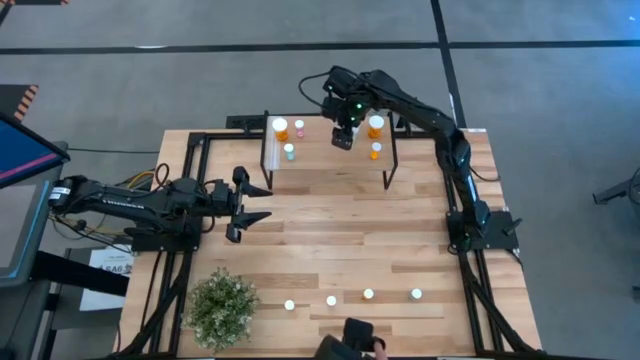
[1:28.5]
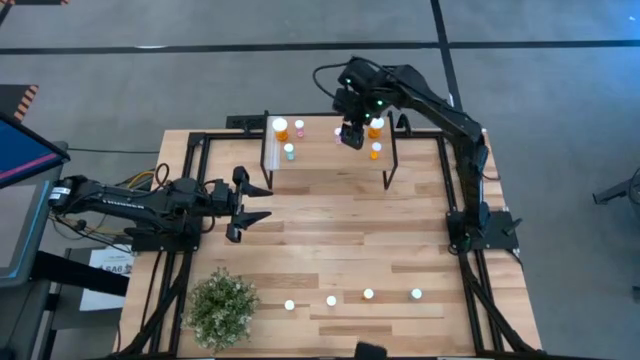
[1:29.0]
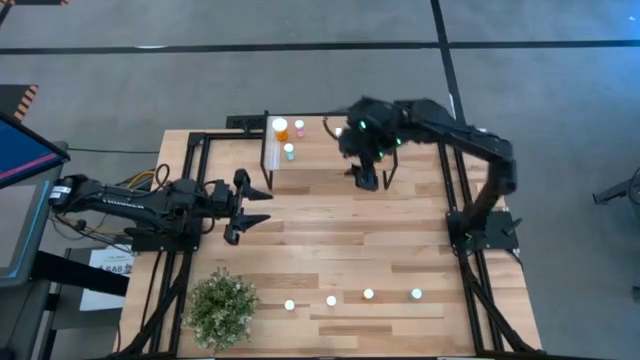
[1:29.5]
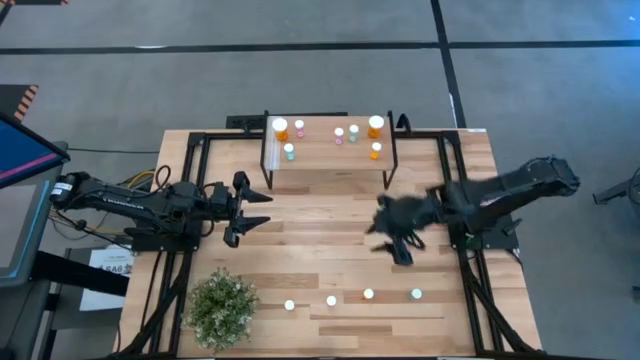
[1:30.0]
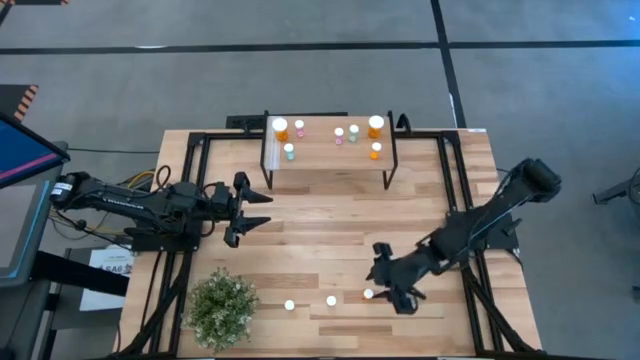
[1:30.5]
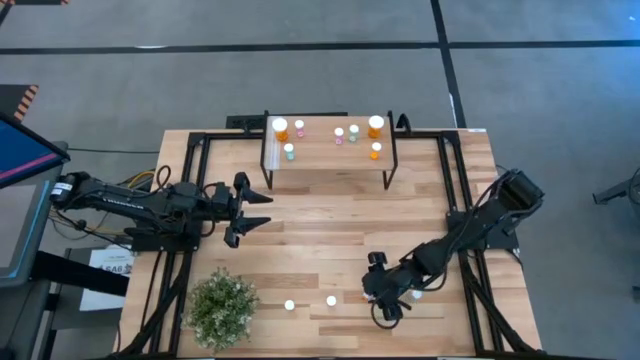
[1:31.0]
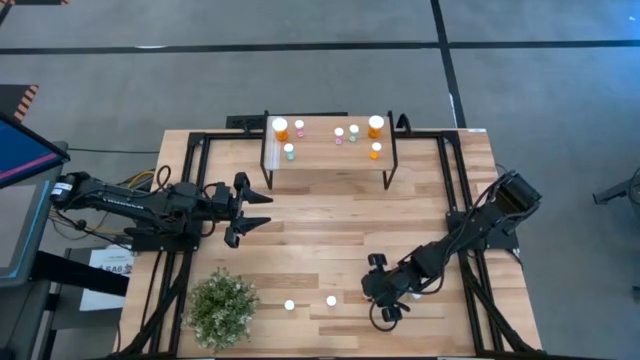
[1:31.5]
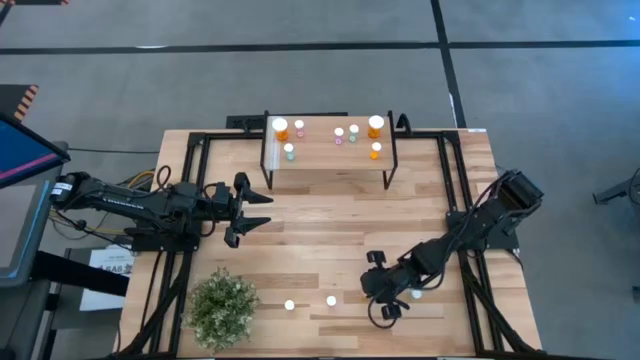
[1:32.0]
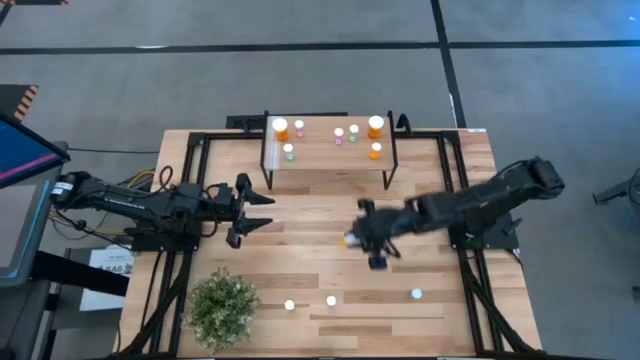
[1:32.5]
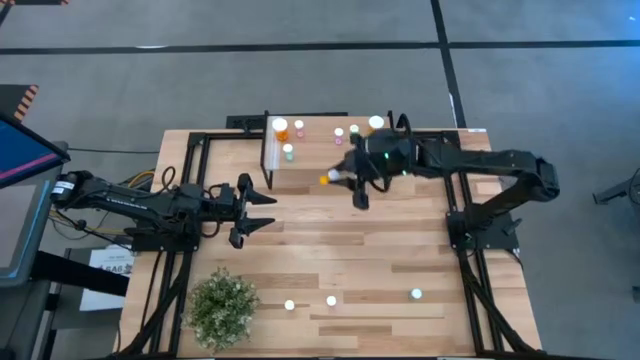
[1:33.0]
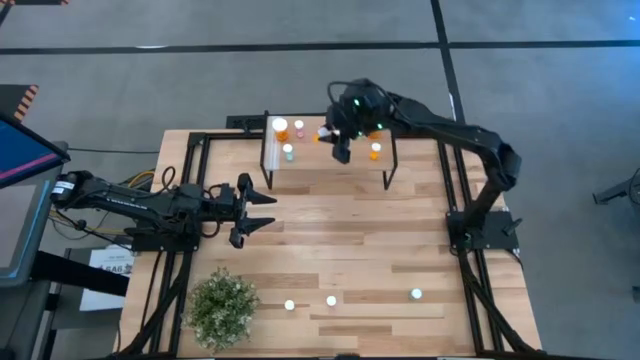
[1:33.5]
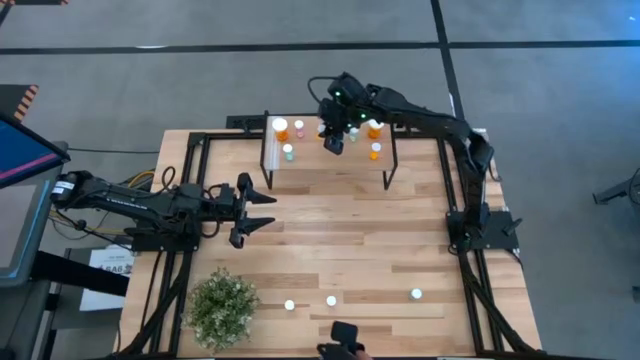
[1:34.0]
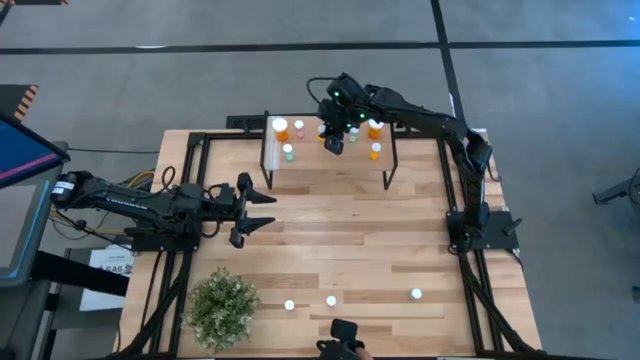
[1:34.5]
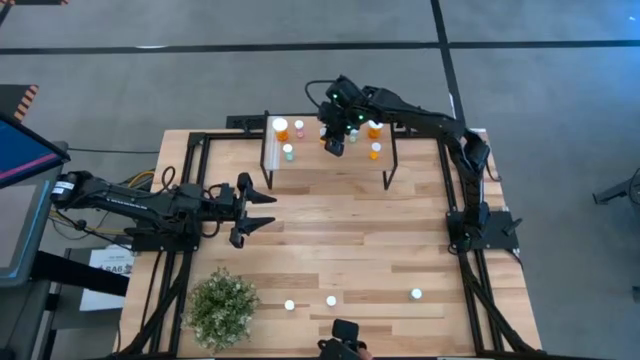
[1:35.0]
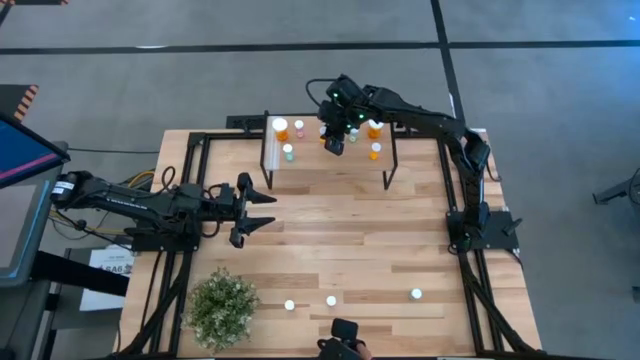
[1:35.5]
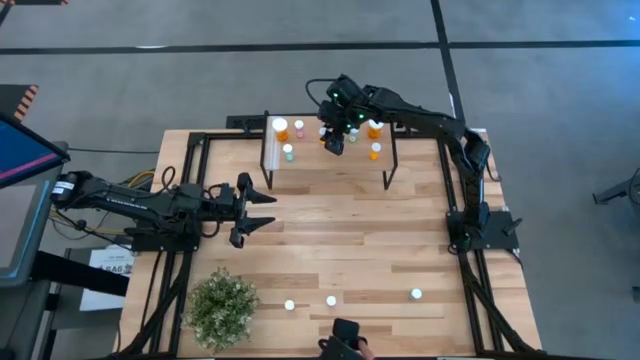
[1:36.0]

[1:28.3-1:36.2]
Task: Pick and place medicine bottles onto shelf by color
Put the orange pill bottle on the shelf

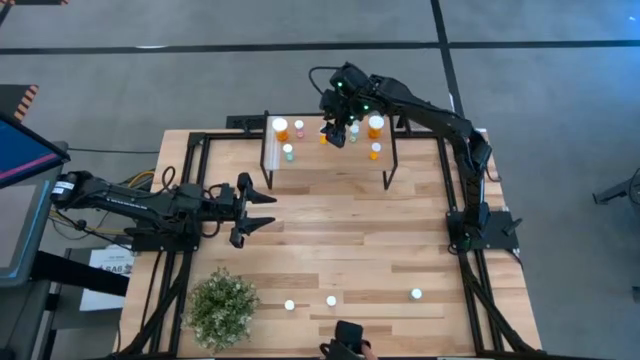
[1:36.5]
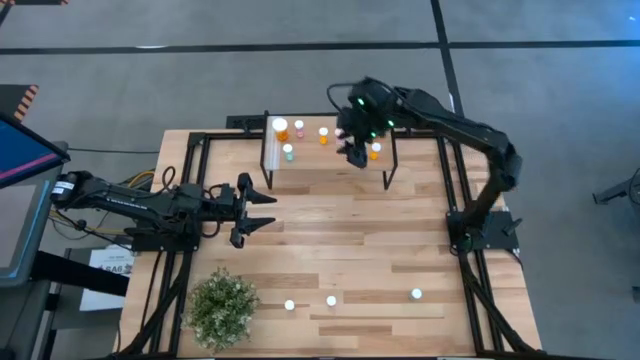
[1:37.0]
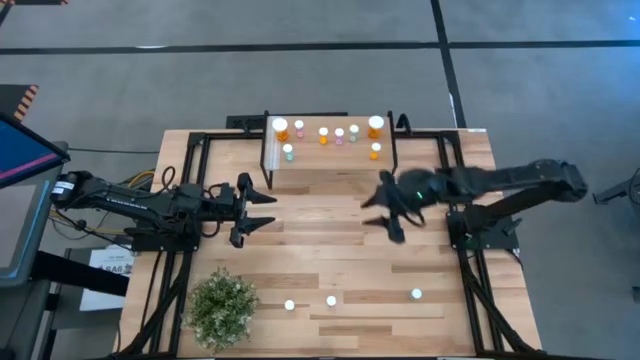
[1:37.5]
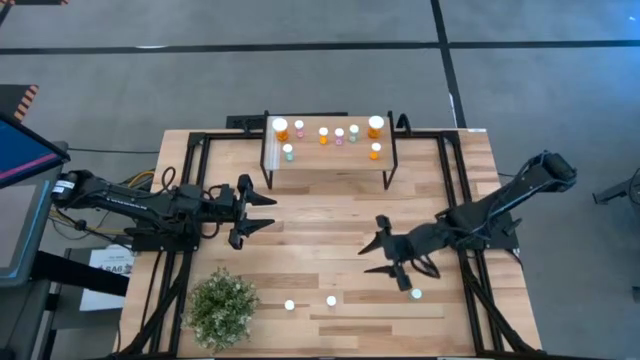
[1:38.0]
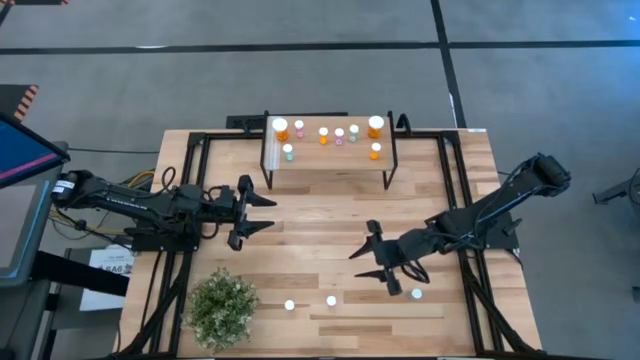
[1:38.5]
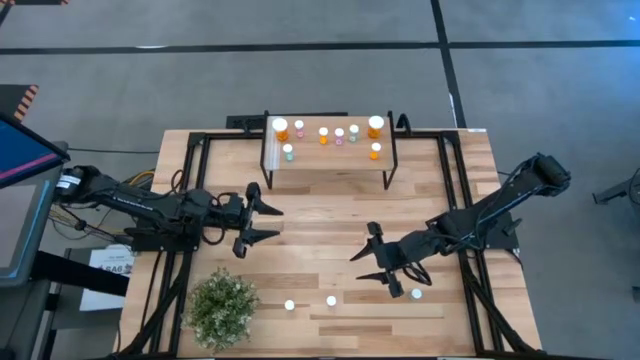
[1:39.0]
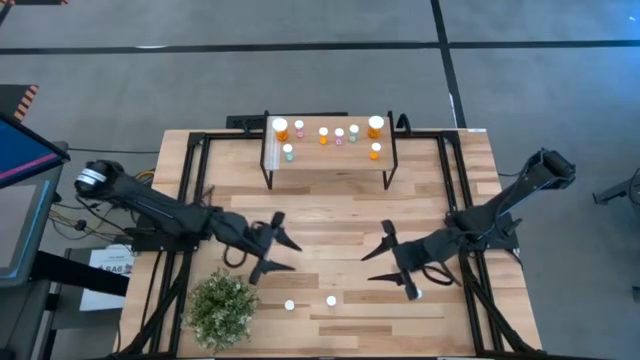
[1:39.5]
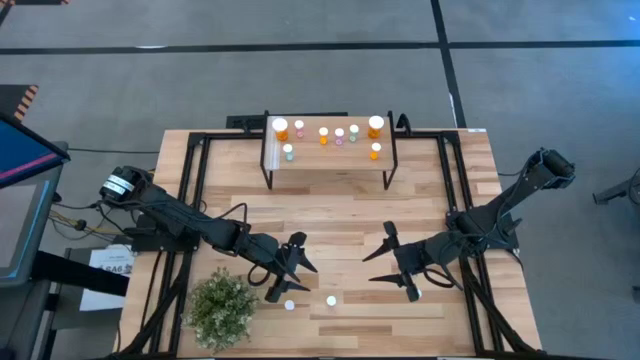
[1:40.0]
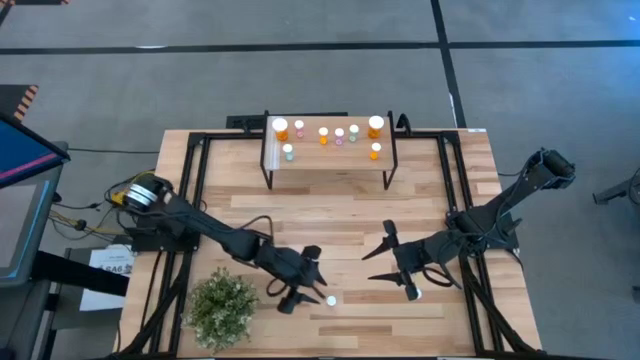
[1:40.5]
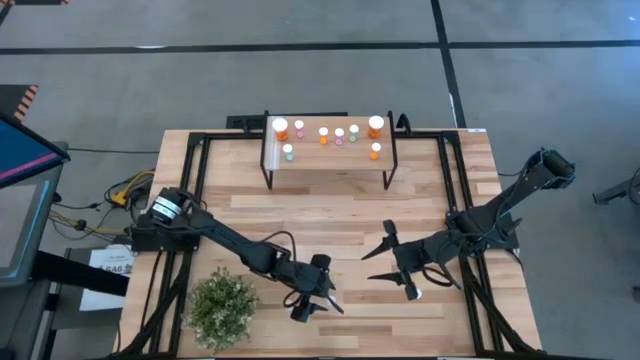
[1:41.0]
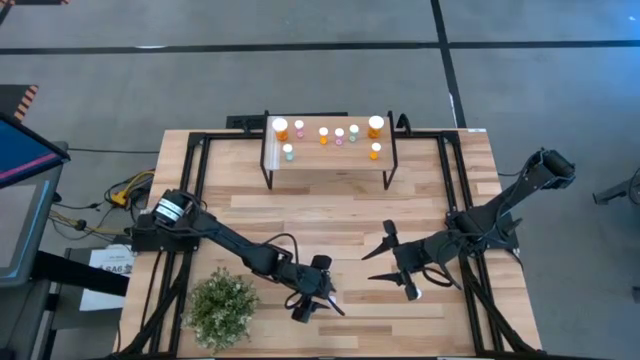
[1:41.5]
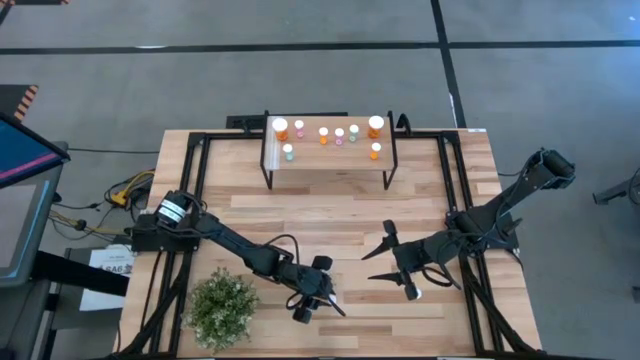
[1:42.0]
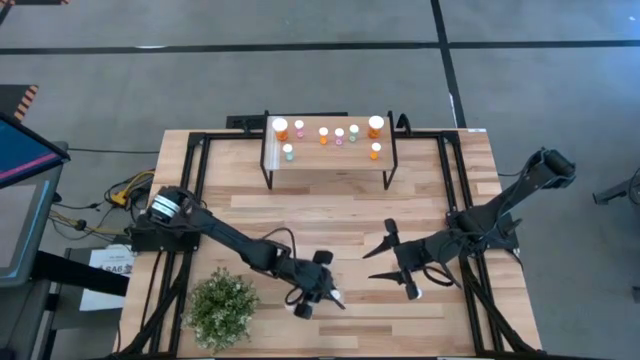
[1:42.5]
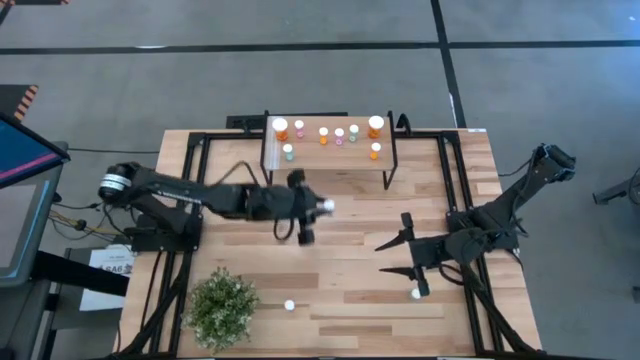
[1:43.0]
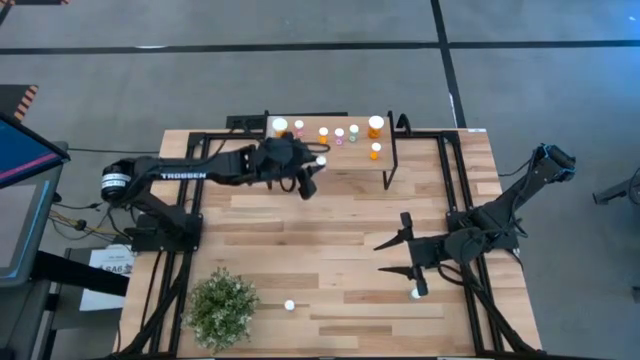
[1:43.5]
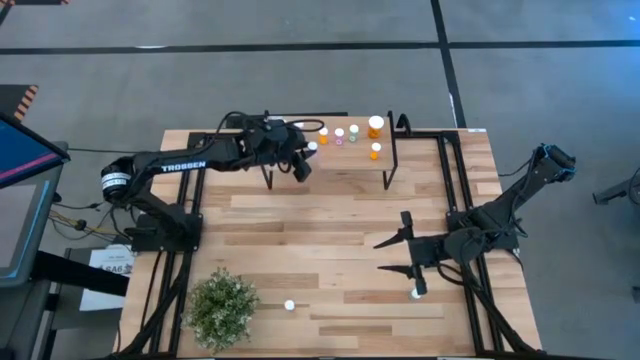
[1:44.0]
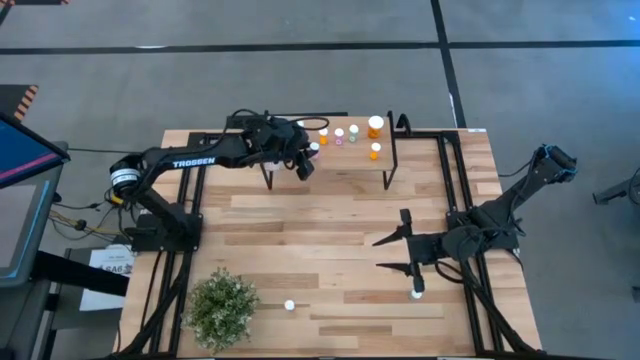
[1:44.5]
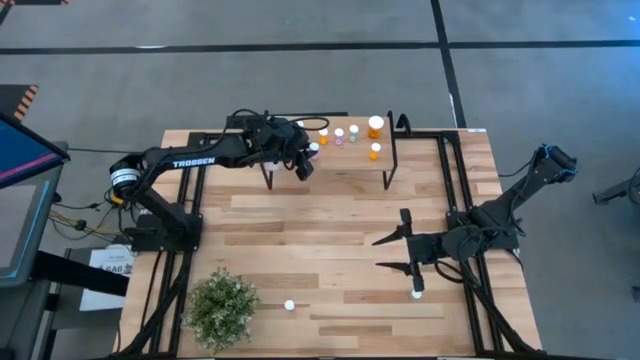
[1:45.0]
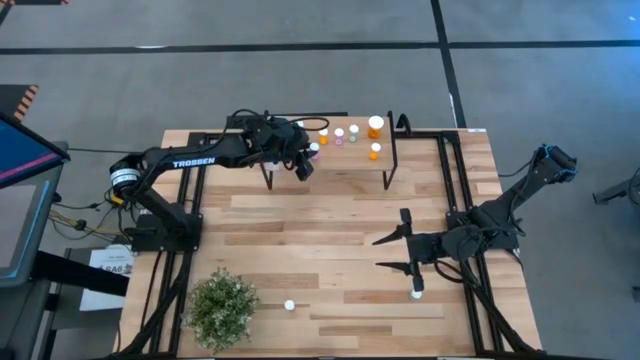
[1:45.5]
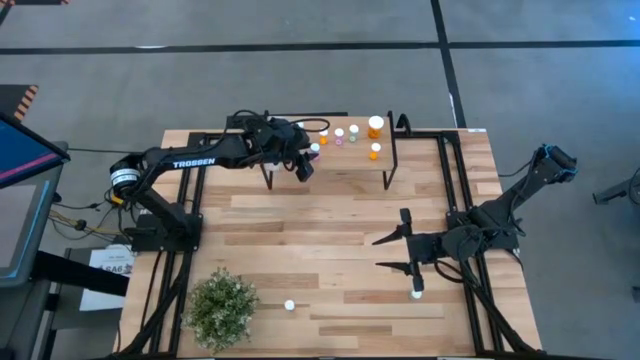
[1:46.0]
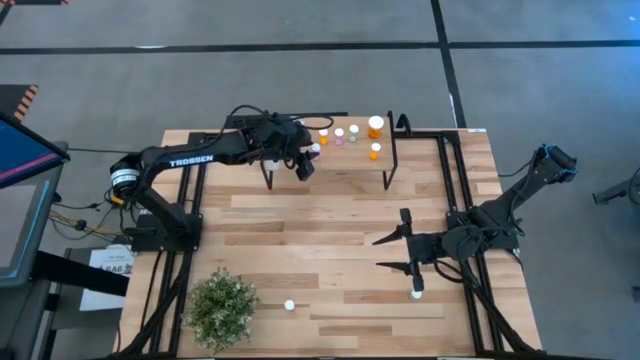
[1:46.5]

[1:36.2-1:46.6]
Put the pink pill bottle on the shelf

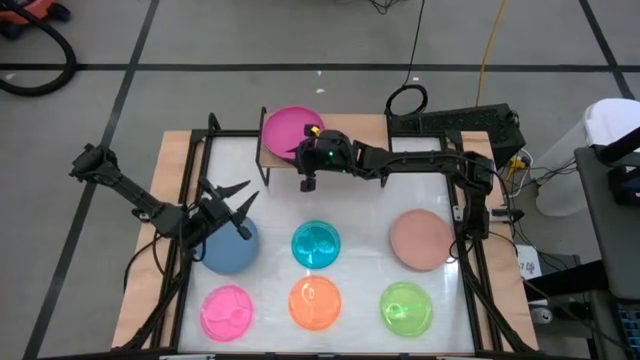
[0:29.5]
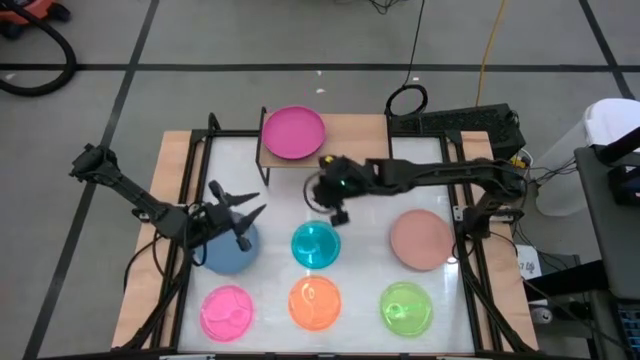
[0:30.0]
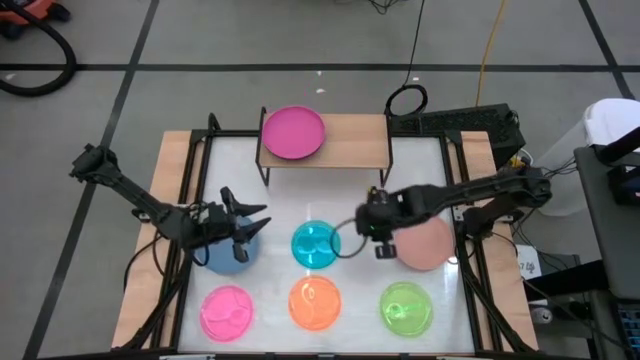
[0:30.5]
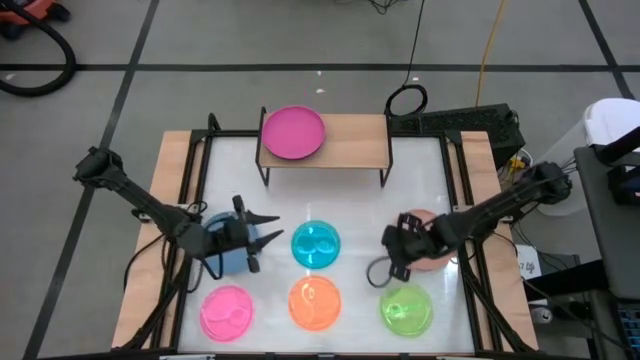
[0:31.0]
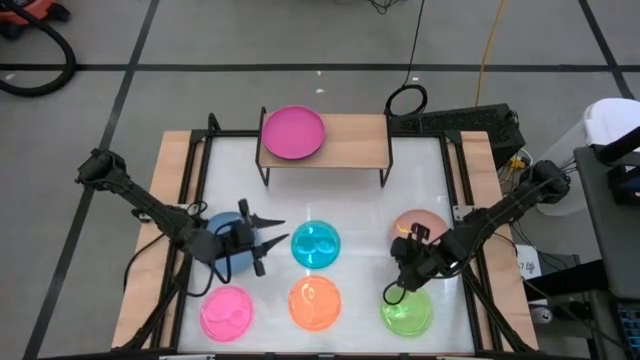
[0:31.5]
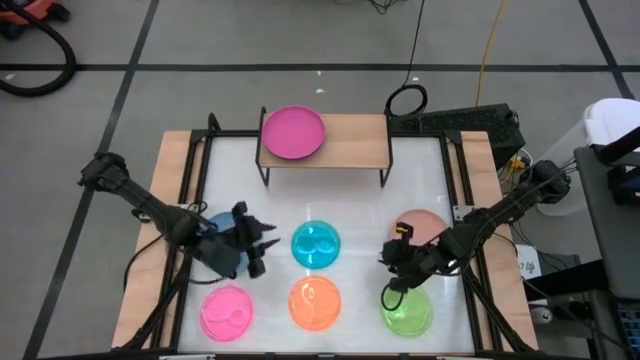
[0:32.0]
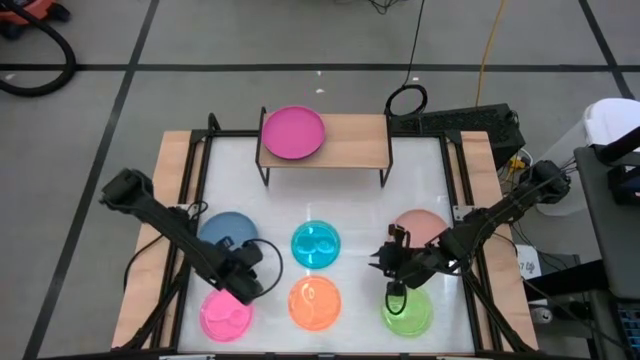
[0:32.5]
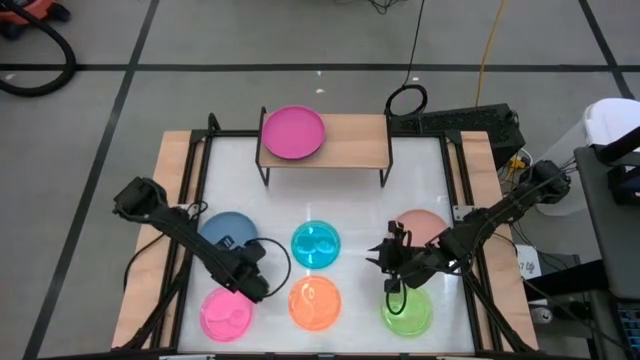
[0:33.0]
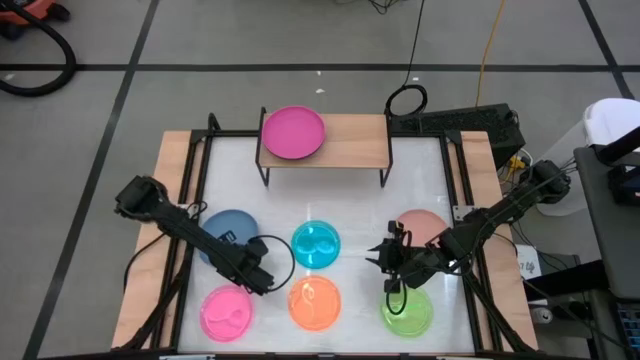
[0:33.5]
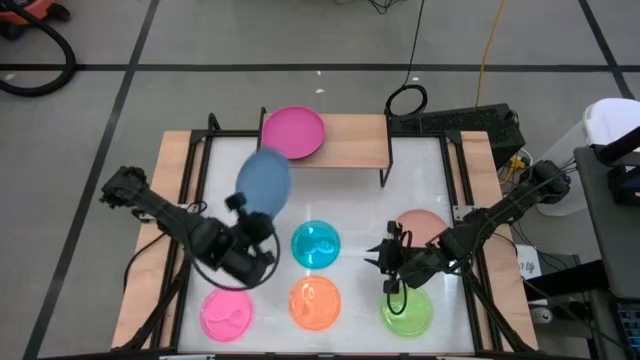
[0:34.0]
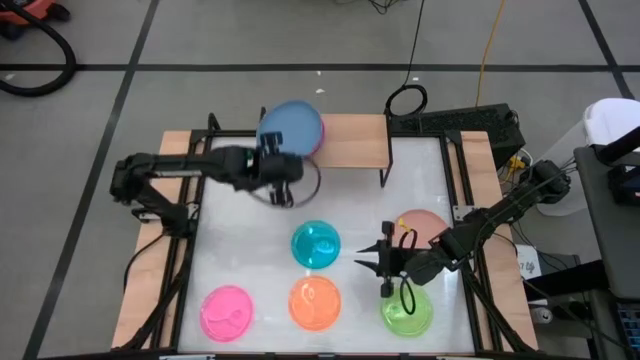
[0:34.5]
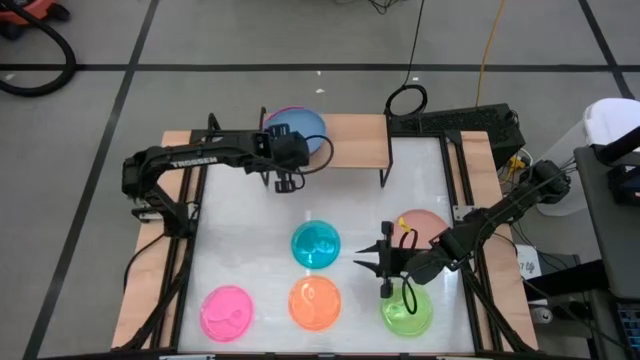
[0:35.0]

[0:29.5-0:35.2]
Task: Place and stack plates onto a shelf
Stack the blue plate on top of the pink plate on the shelf
